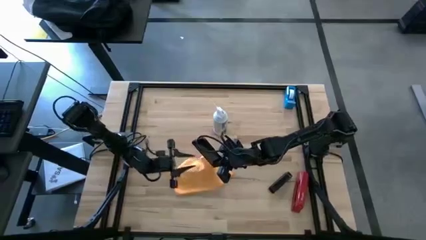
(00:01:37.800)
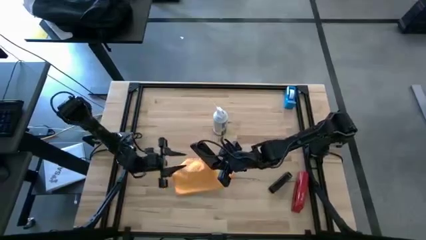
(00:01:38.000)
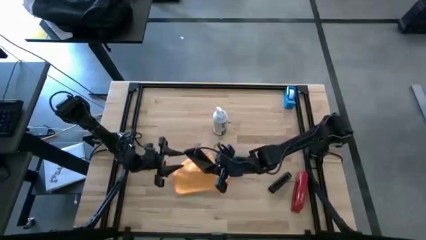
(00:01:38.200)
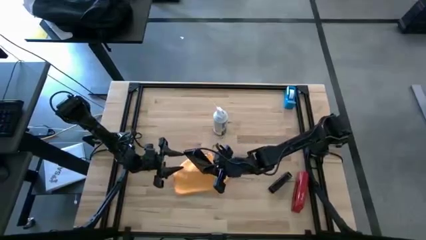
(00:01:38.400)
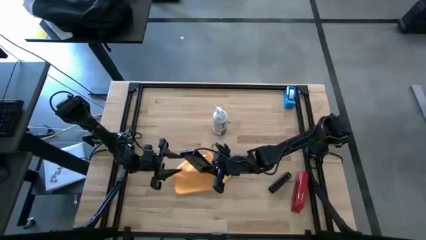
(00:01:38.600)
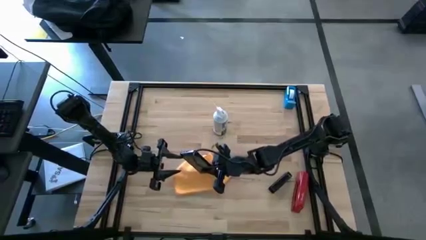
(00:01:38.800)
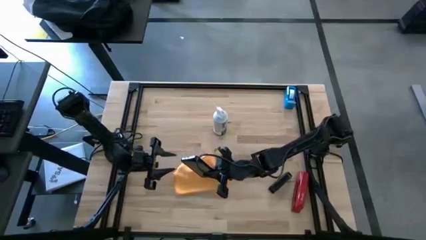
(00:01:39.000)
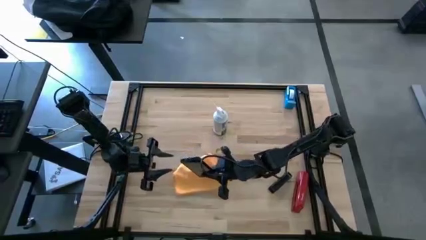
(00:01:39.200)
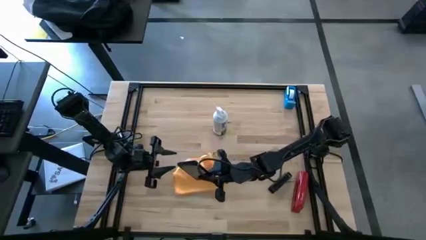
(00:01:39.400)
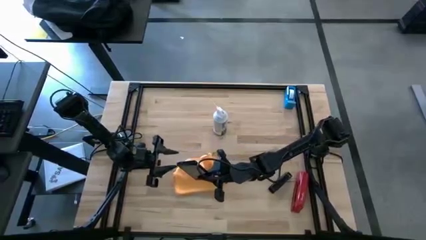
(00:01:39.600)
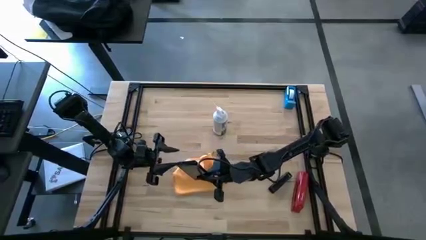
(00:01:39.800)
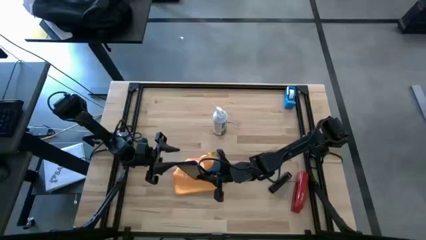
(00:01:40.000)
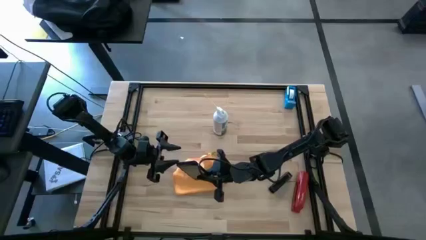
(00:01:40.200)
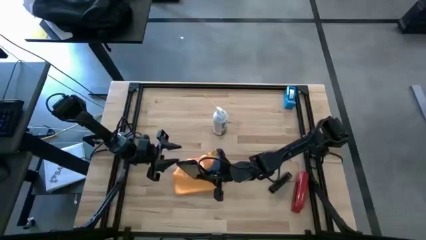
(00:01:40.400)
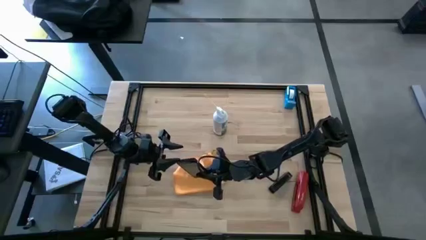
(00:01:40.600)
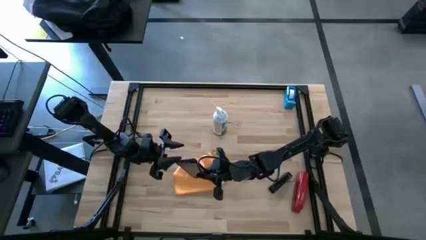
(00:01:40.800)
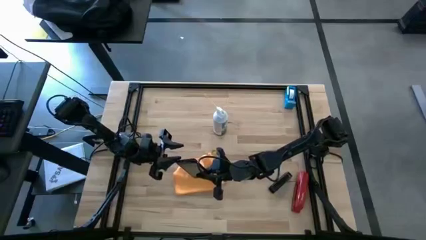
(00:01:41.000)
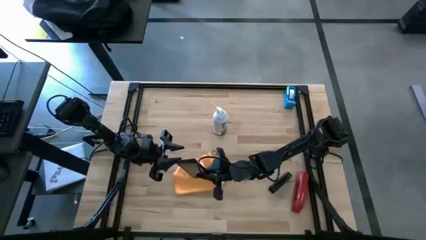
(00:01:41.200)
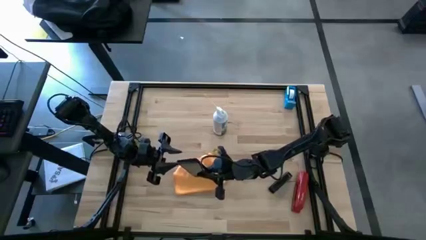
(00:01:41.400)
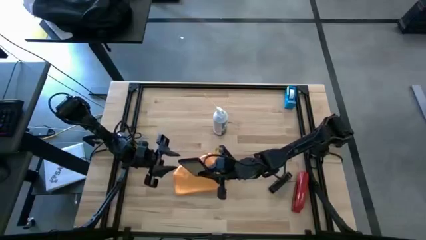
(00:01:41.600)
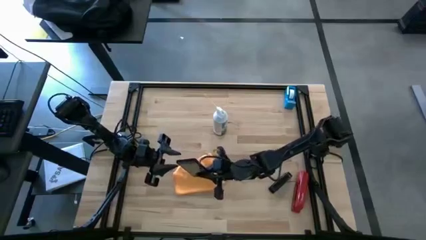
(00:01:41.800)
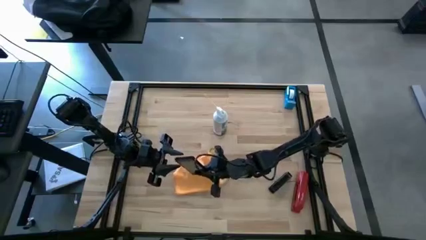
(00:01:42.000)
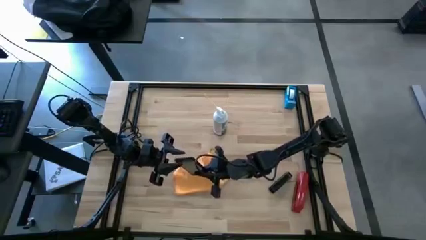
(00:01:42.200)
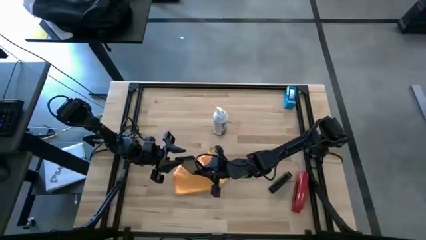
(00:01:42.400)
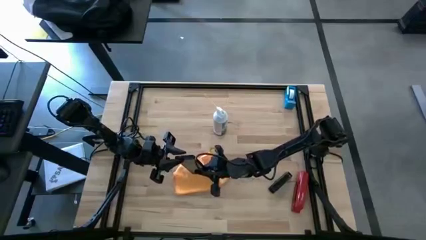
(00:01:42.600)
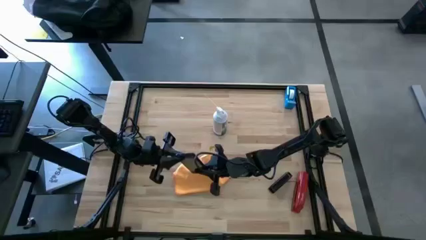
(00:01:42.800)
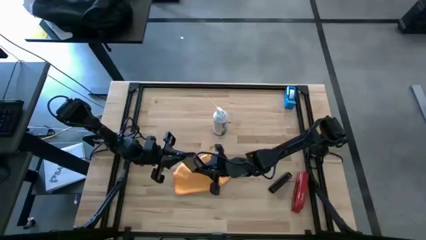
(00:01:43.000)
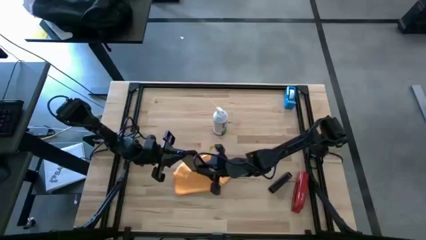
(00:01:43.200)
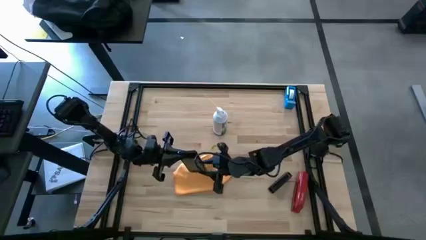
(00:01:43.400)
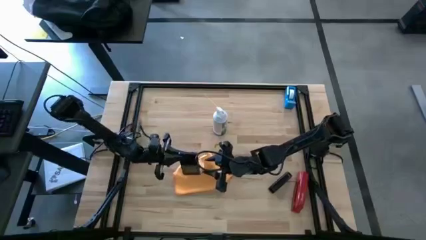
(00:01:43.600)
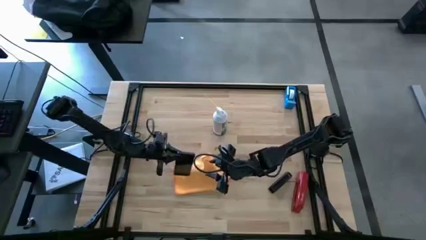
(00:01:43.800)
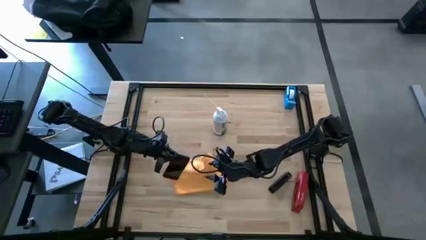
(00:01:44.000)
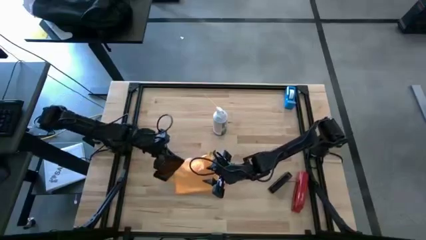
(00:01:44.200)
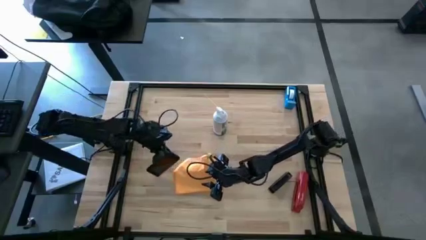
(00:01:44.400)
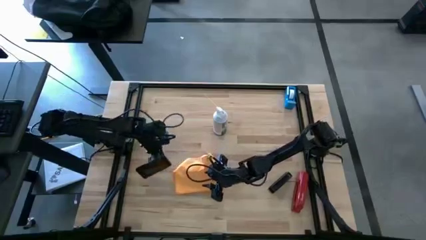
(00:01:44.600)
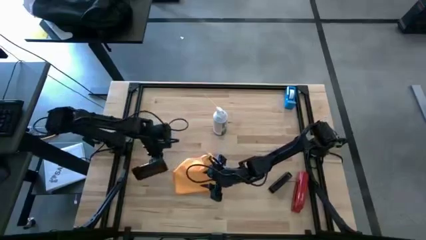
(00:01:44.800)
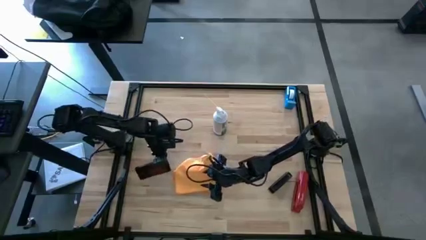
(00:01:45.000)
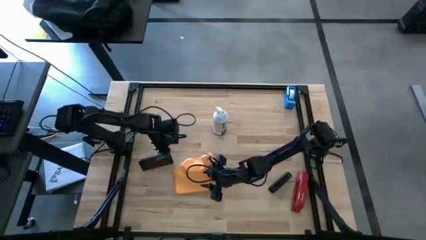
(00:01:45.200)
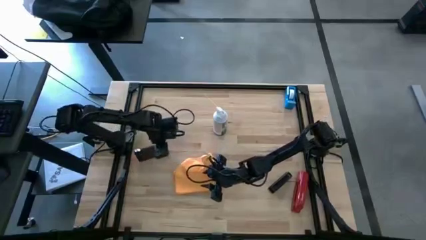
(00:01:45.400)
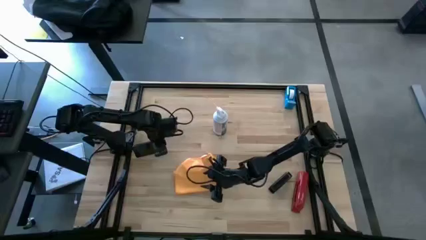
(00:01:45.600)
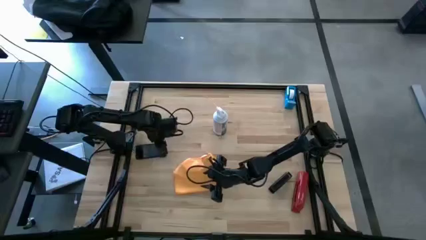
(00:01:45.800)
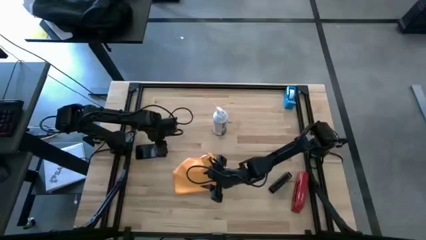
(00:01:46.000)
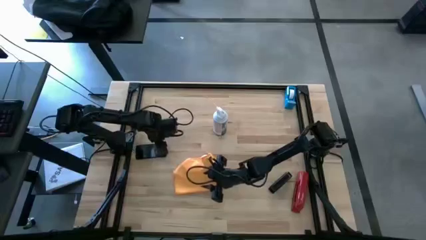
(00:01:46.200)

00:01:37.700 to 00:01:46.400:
Task: Apply microfiber cloth
Put the cellphone on the middle left of the table

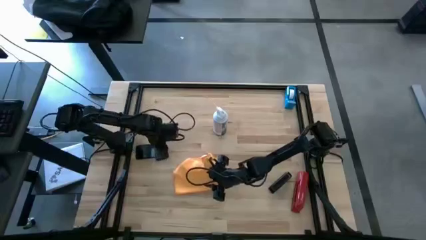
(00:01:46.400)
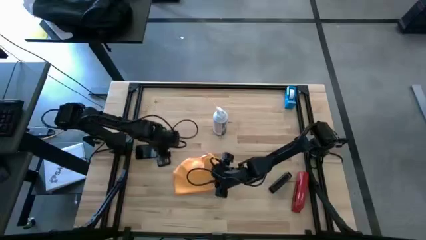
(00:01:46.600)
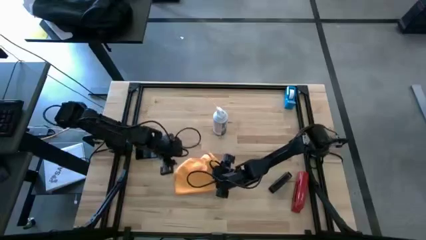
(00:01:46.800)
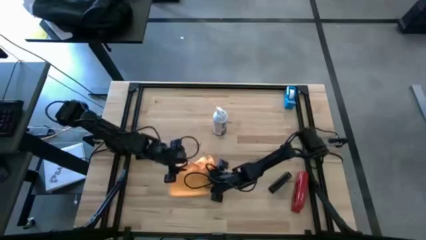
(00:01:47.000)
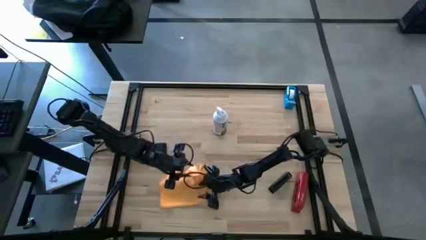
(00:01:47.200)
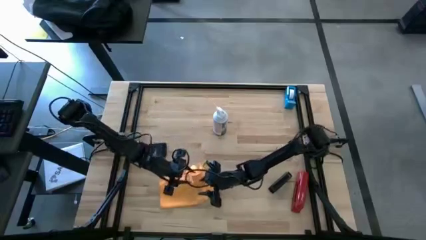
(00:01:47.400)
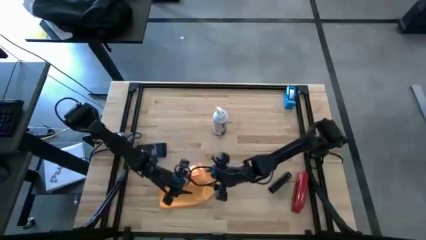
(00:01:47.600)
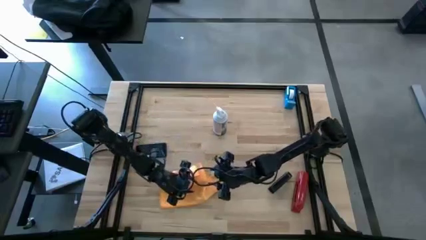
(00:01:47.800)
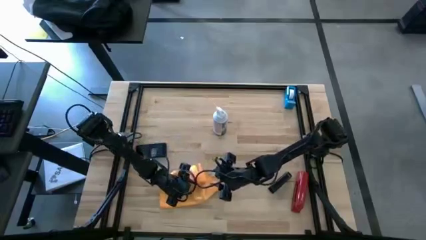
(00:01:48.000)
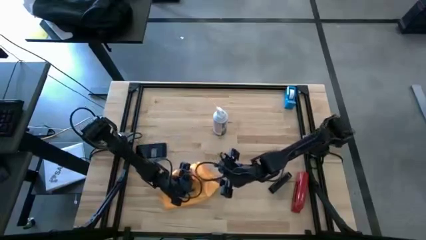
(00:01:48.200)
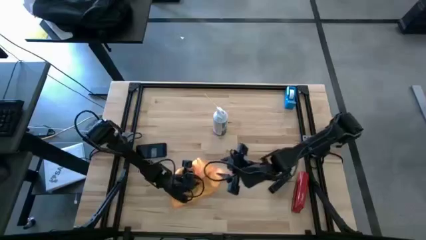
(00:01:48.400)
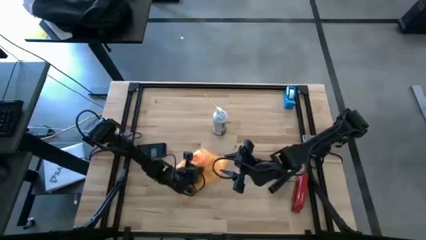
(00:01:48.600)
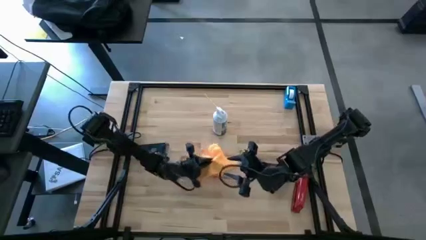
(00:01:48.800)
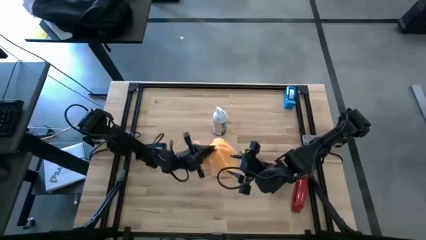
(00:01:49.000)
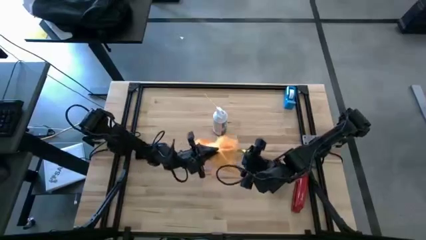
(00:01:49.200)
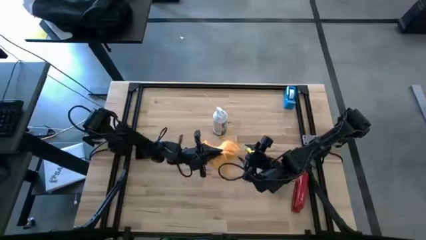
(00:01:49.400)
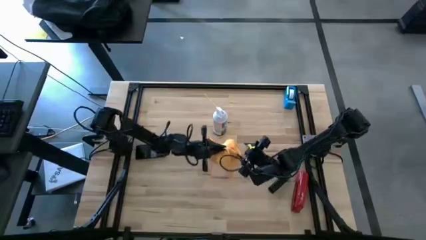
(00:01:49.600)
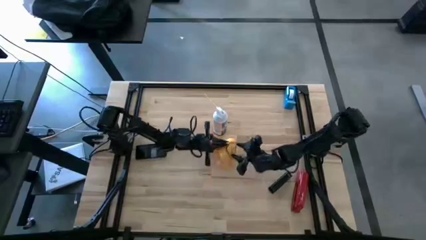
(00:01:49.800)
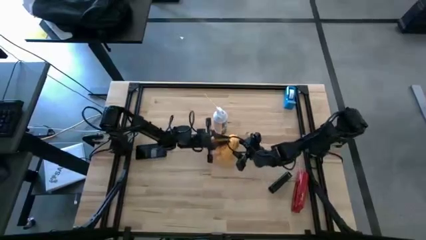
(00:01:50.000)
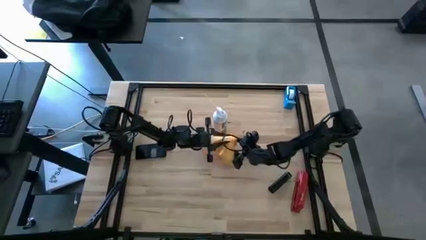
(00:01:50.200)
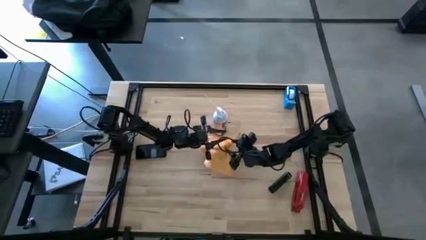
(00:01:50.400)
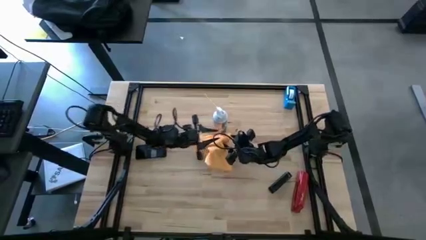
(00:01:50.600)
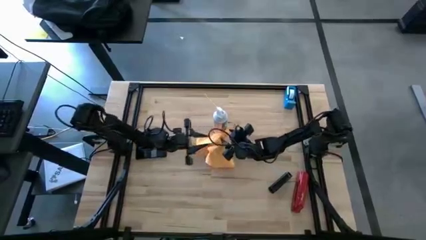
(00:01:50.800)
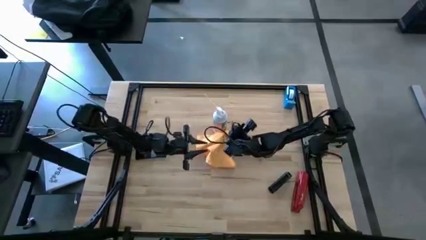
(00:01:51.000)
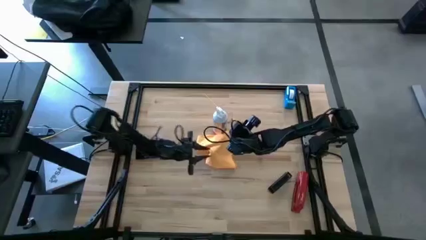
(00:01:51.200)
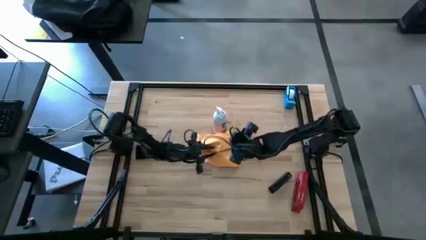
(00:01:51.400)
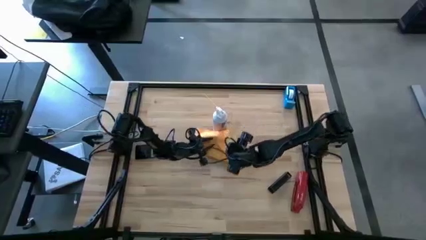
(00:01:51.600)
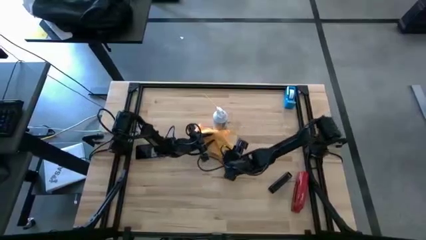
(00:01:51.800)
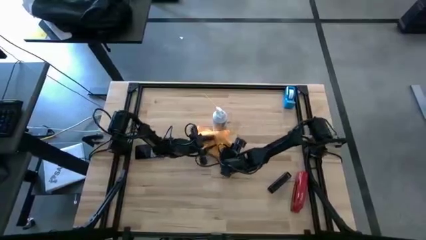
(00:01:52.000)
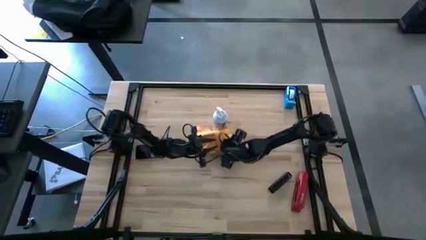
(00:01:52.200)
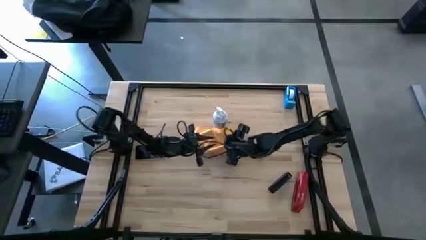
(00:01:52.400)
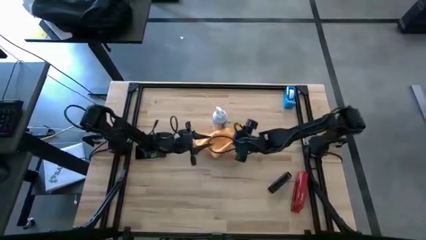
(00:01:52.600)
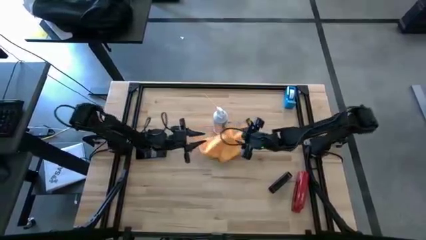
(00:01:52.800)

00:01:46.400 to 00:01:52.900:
Move the yellow microfiber cloth below the white spray bottle
